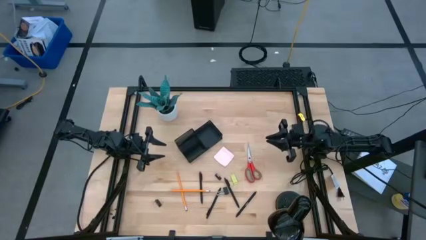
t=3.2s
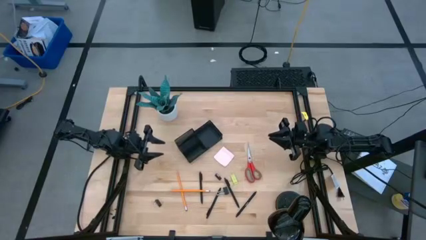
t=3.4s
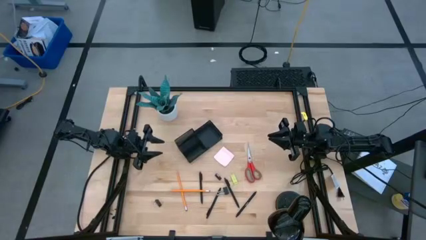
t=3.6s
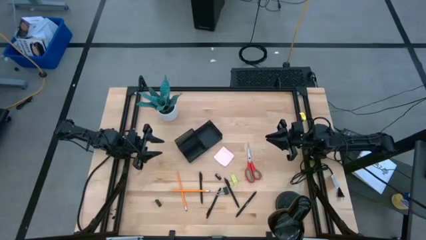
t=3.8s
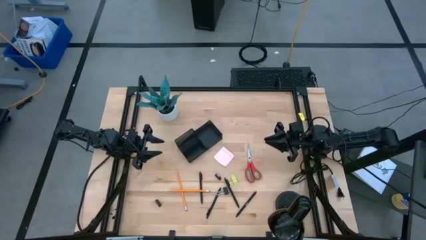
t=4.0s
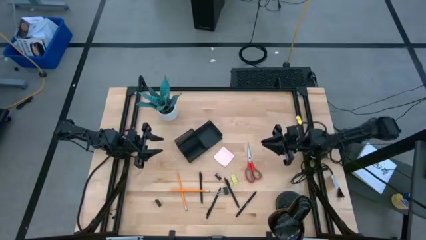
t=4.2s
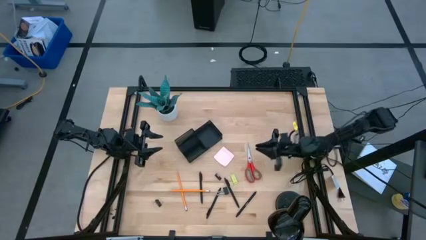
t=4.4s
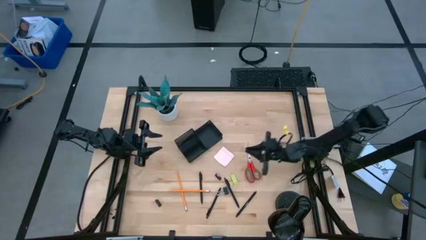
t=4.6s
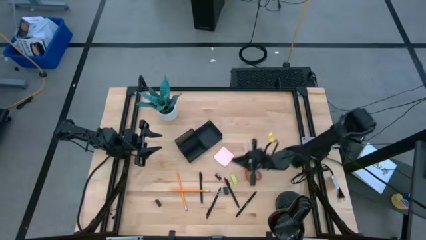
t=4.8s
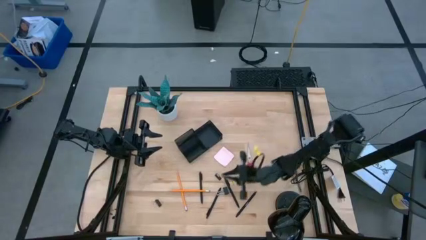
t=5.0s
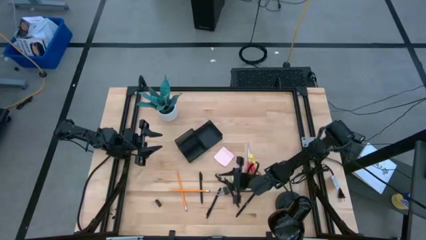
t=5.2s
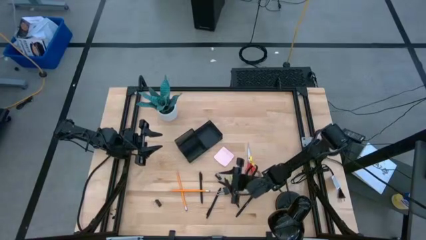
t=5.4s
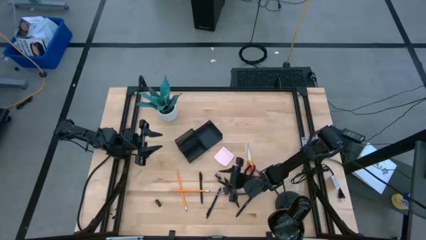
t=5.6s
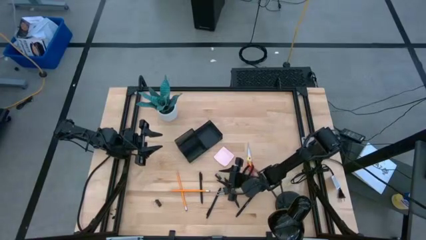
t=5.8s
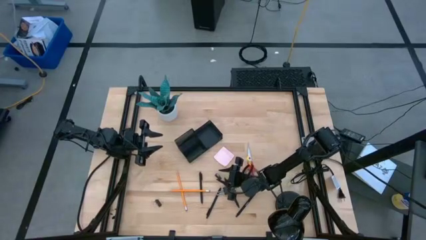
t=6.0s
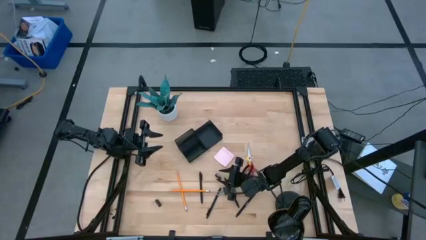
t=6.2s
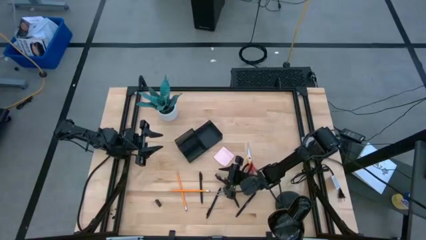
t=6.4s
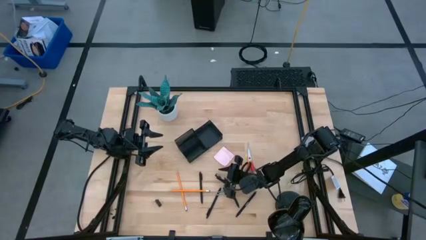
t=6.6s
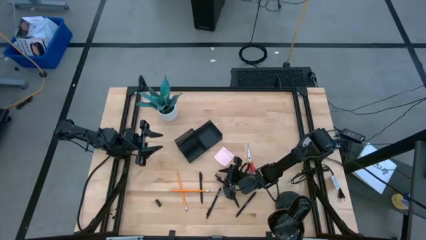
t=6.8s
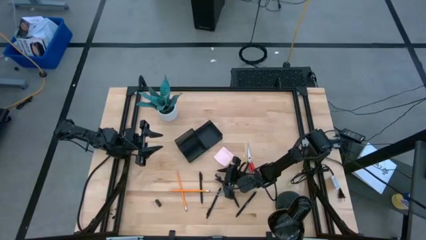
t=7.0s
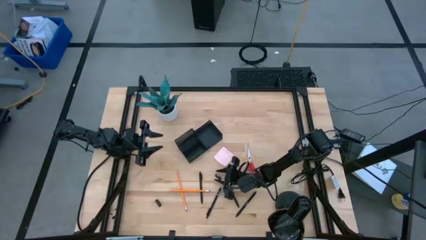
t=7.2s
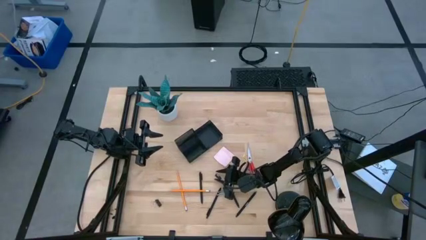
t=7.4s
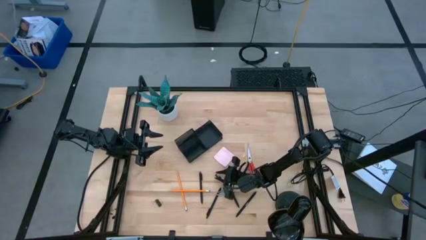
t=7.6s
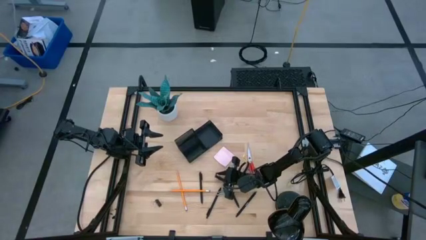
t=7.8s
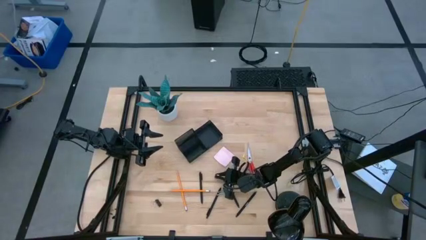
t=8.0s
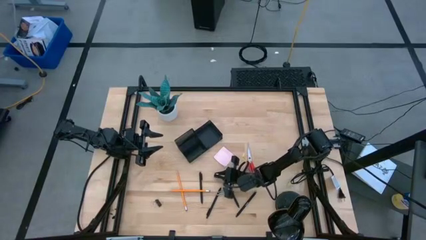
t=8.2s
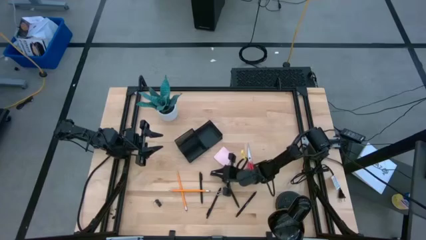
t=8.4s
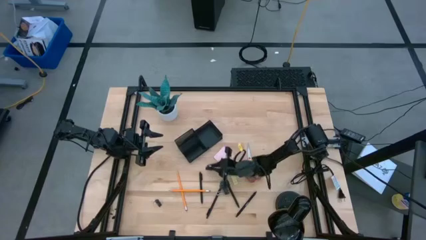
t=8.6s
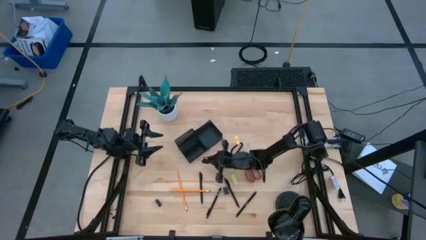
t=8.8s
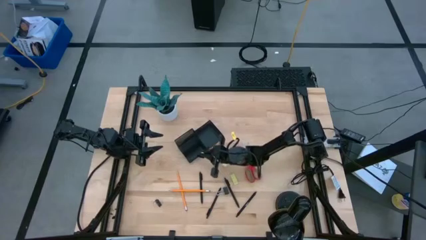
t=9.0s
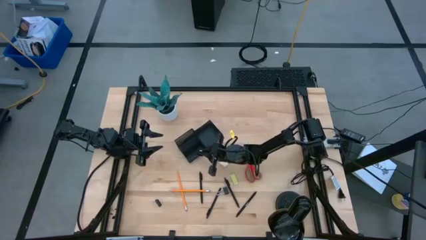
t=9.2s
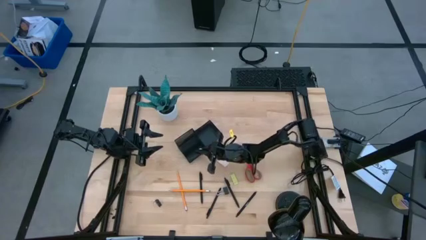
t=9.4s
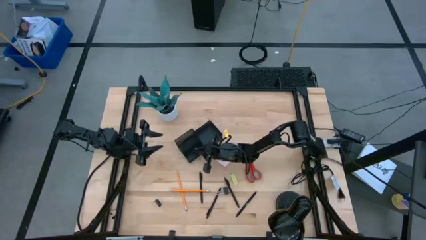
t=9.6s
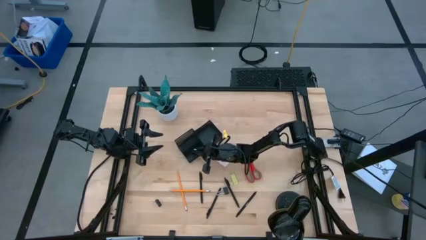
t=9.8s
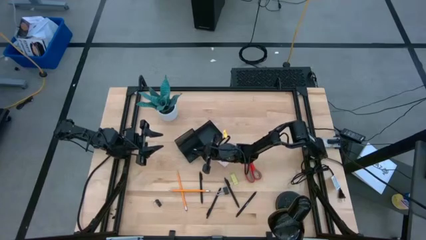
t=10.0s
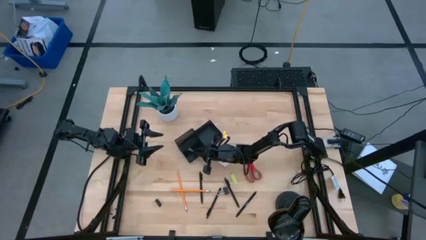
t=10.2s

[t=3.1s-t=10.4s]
Task: Pick and place office supplies into organizer
Put the black binder clip into the black desk organizer

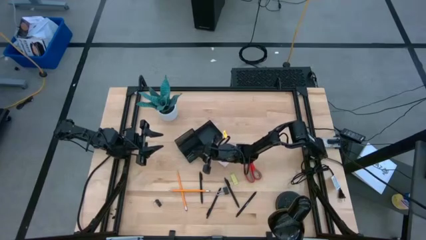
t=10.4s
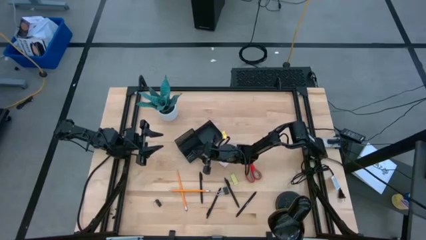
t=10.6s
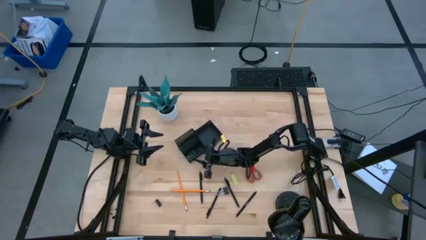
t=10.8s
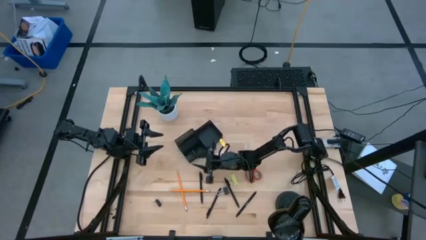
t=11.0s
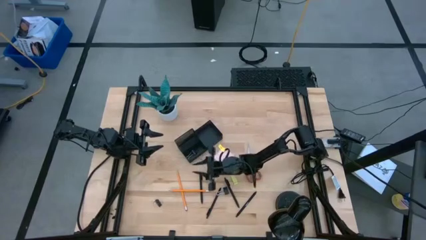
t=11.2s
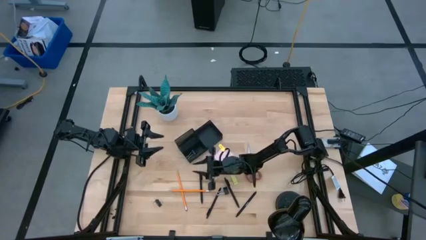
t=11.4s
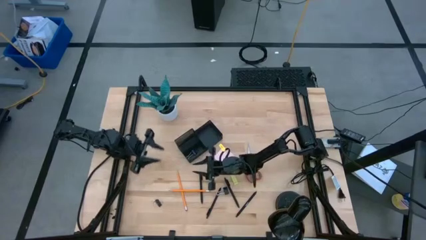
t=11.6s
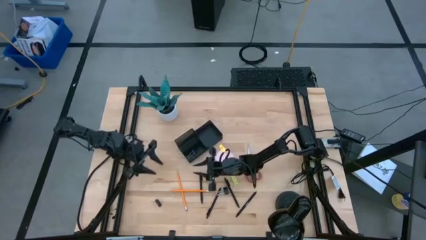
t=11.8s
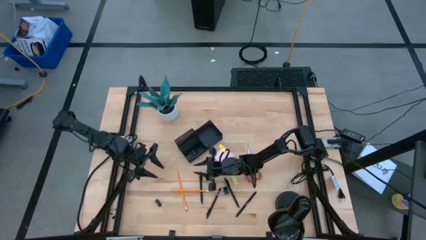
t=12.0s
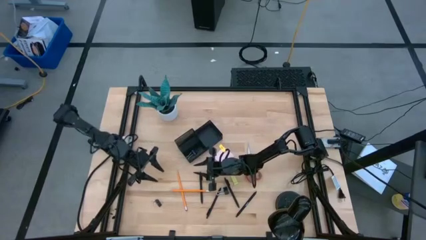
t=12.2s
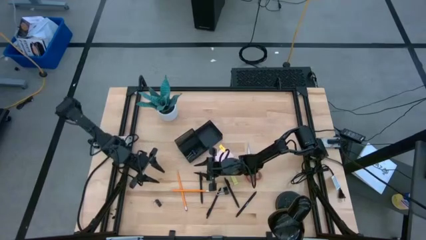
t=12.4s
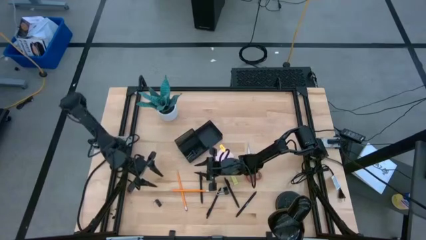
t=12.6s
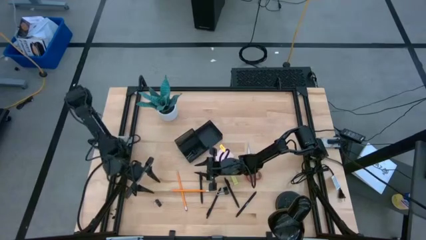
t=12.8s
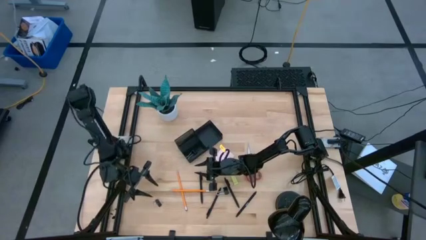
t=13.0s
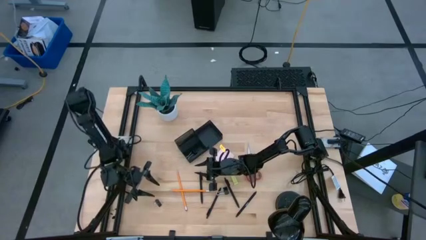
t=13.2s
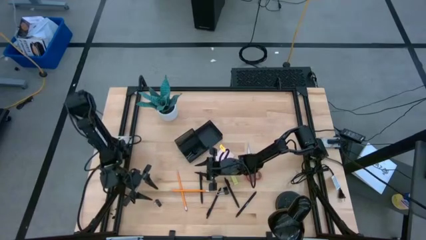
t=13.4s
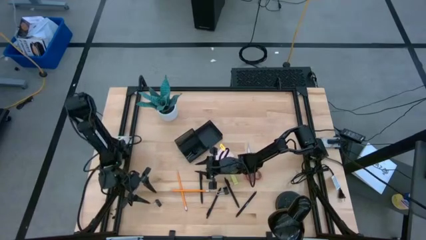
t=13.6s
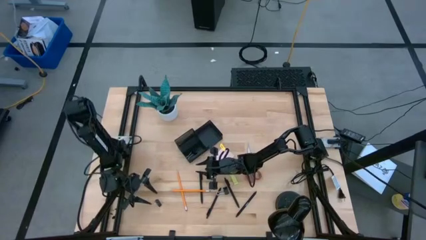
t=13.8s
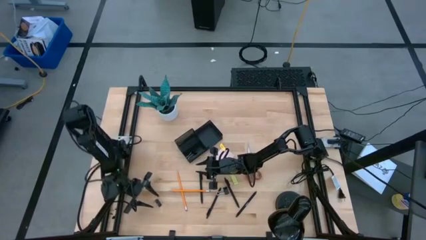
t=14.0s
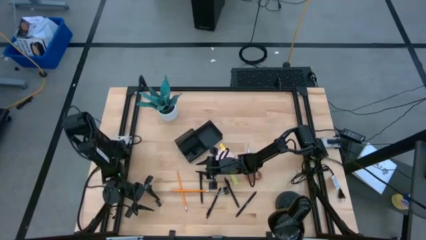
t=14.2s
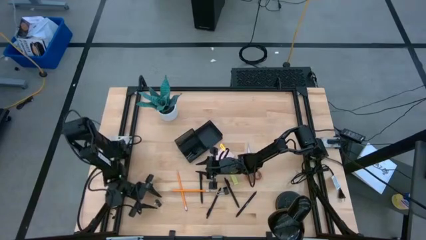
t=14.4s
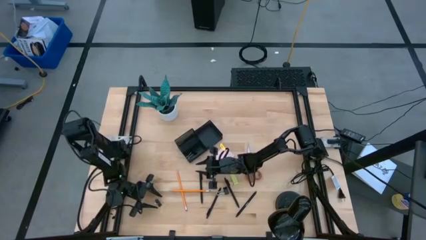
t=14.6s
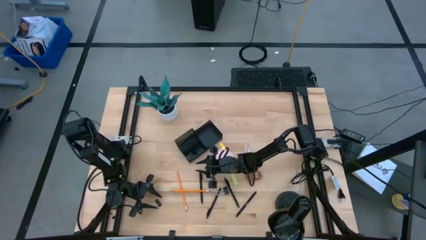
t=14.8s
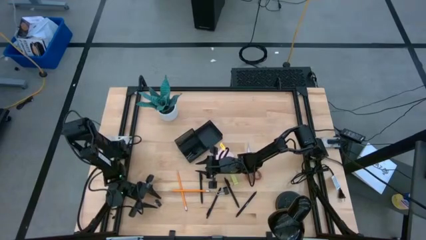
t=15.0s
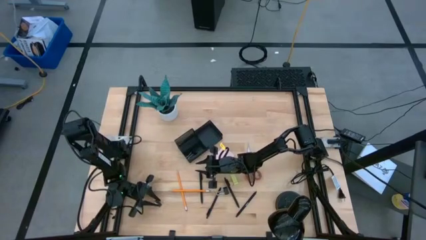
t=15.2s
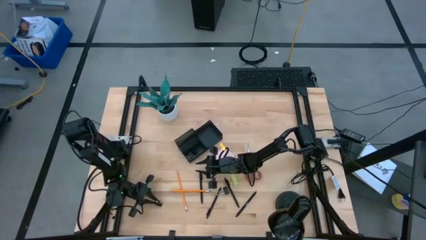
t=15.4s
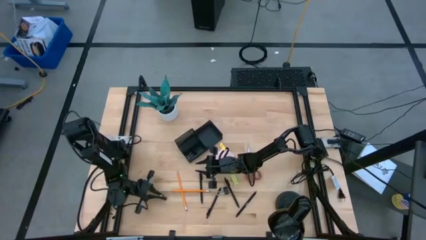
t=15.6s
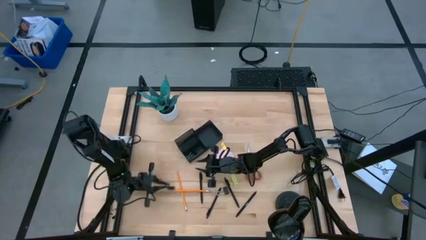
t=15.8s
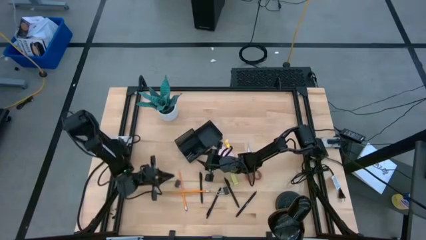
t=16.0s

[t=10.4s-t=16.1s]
Put the black binder clip into the black desk organizer

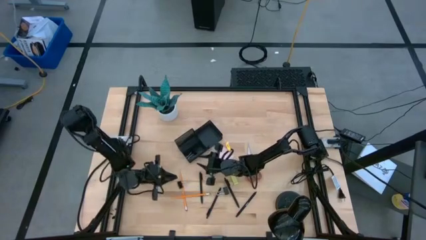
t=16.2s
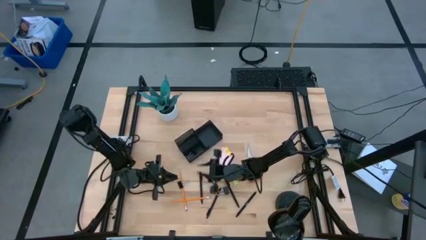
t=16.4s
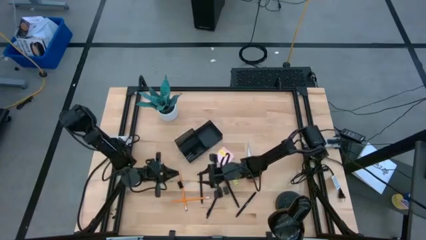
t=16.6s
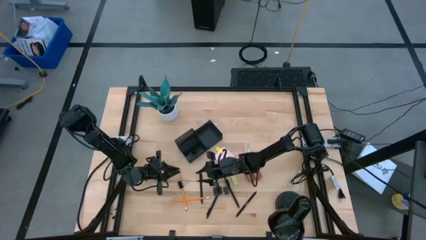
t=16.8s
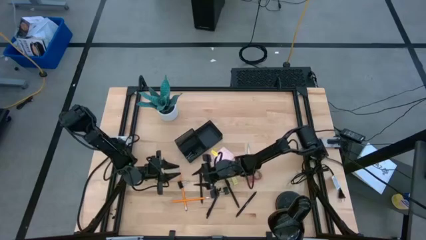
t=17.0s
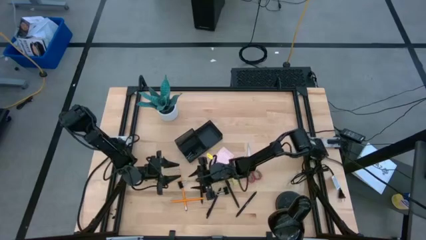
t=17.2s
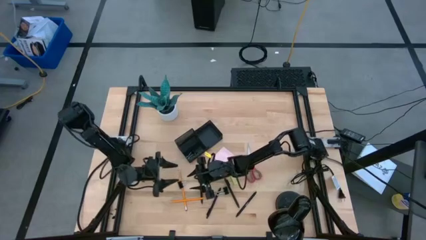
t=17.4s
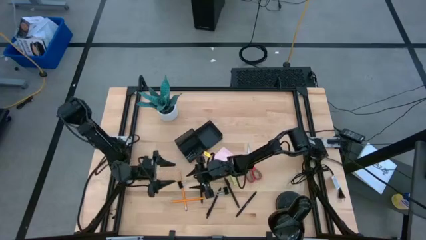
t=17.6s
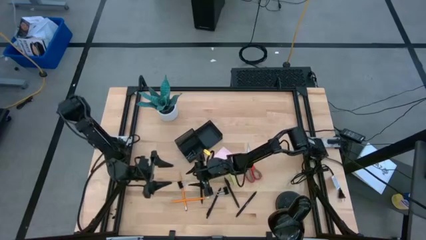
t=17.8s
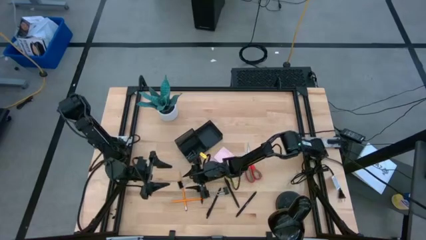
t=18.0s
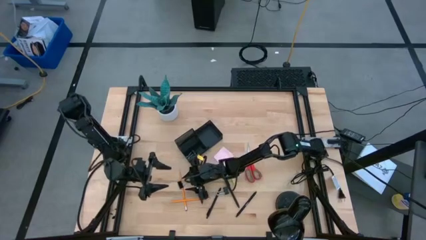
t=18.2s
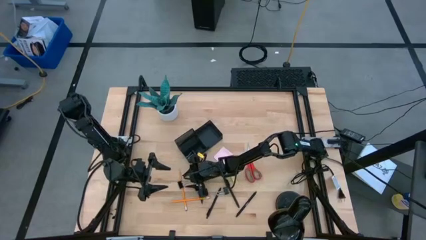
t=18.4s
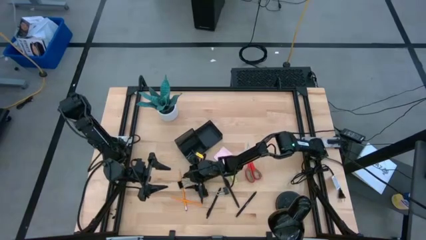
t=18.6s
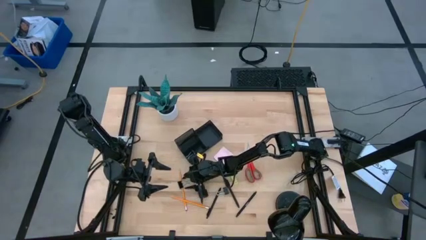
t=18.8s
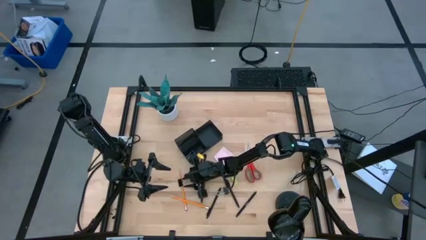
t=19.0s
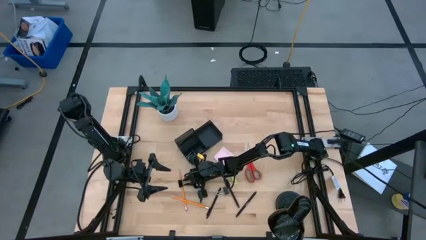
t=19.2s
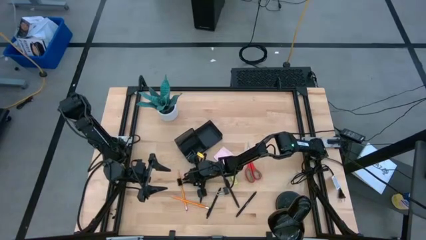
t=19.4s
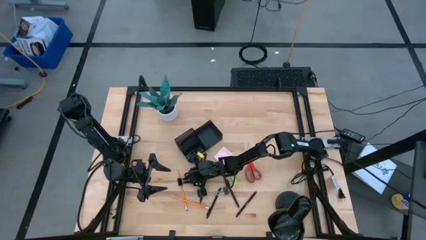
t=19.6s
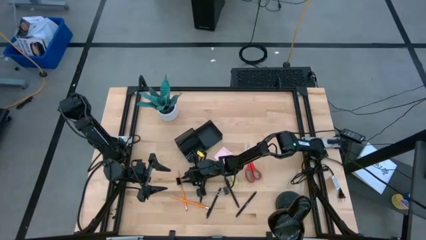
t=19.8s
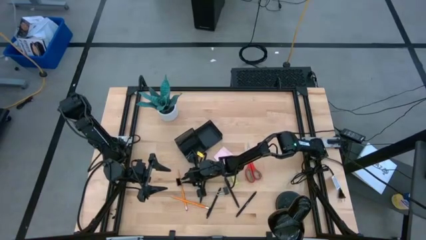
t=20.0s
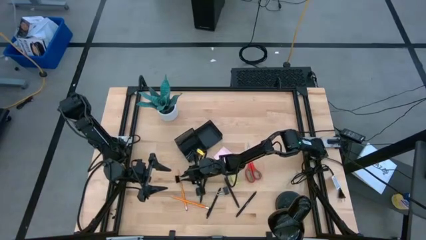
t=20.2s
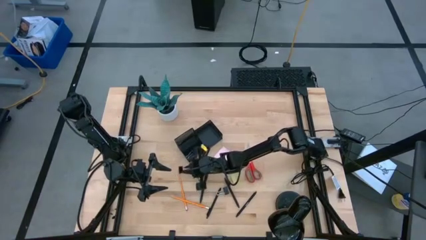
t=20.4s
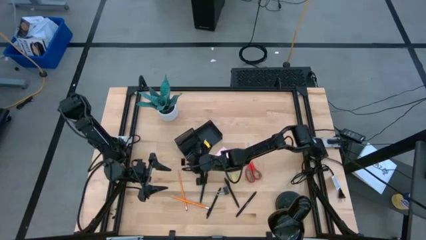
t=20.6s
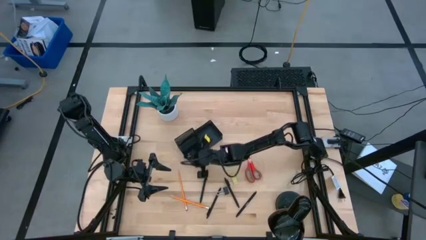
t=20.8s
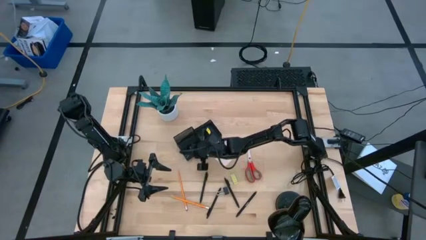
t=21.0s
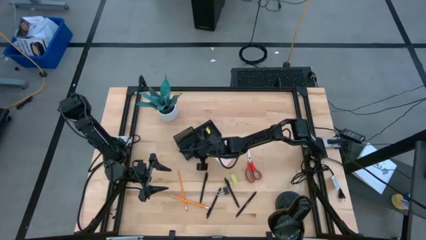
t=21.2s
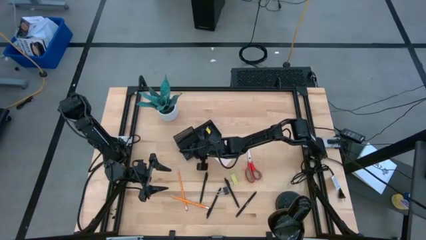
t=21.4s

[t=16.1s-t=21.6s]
Put the black binder clip into the black desk organizer
